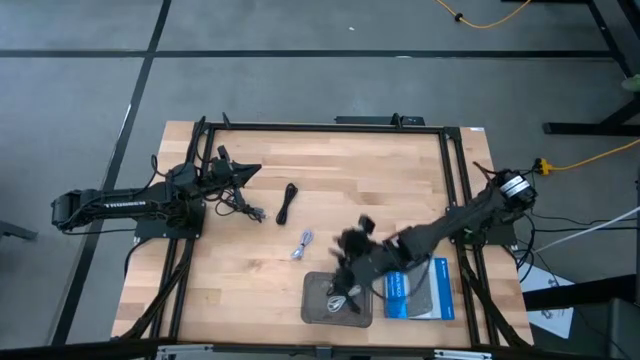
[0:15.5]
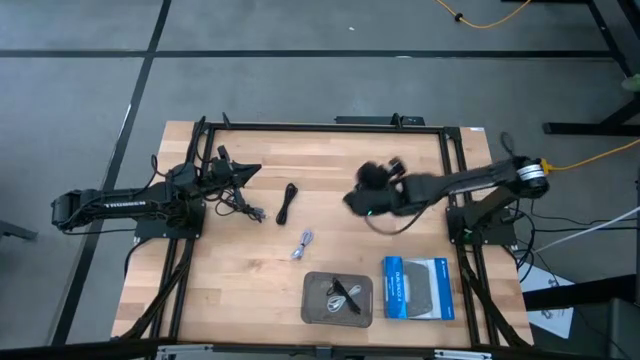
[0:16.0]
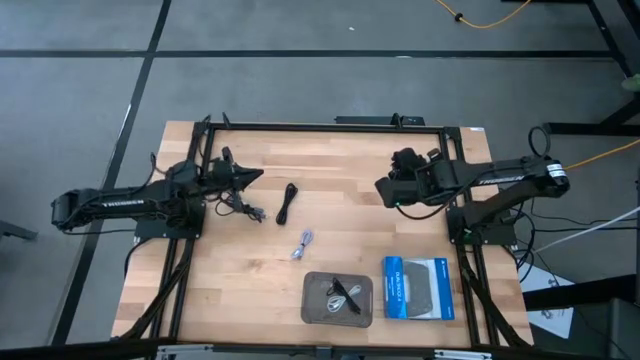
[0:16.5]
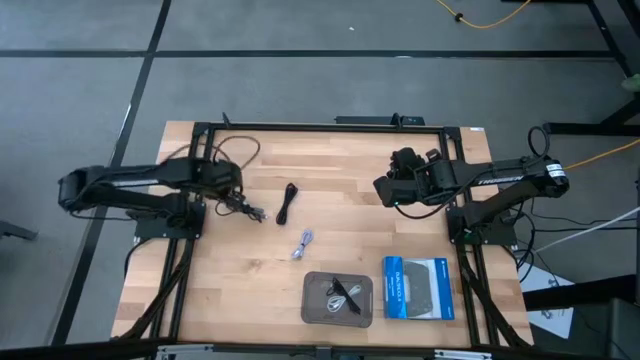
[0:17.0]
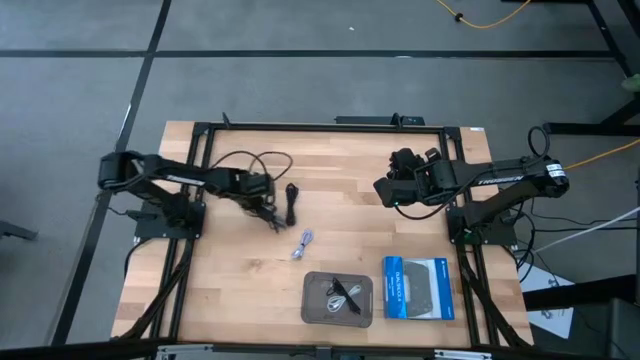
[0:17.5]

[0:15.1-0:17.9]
Task: Pick and place USB-C Cables
Move the left black charger cable to the middle of the table

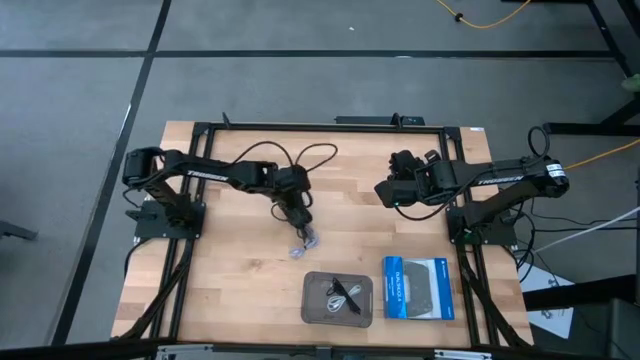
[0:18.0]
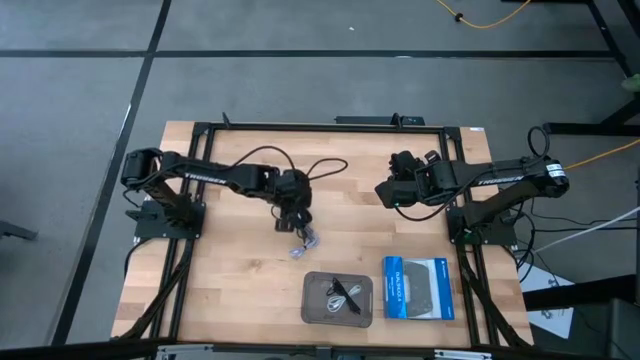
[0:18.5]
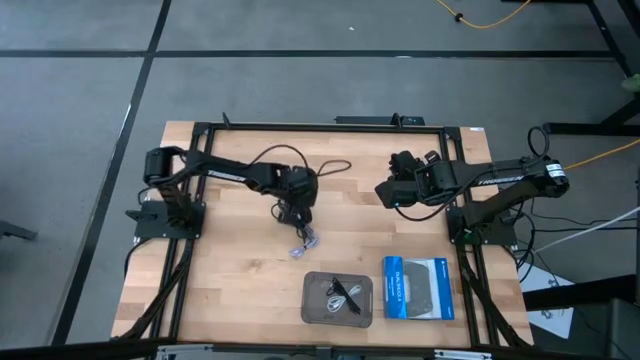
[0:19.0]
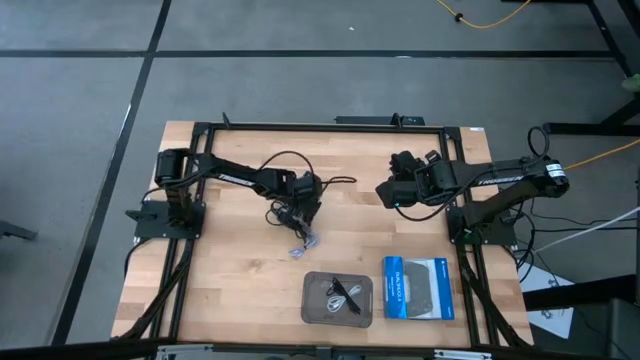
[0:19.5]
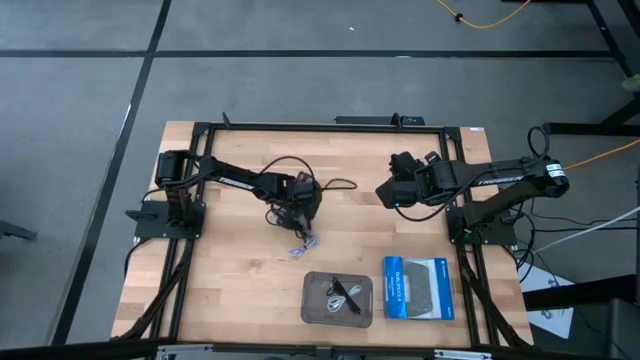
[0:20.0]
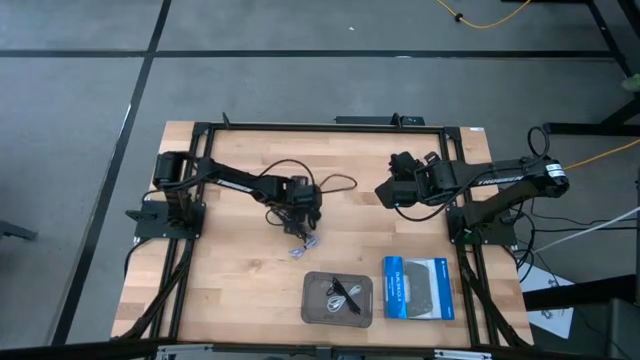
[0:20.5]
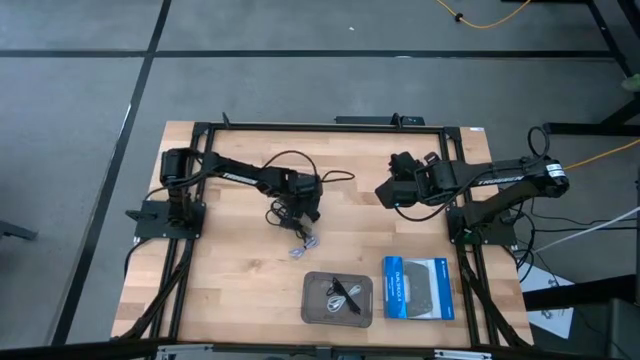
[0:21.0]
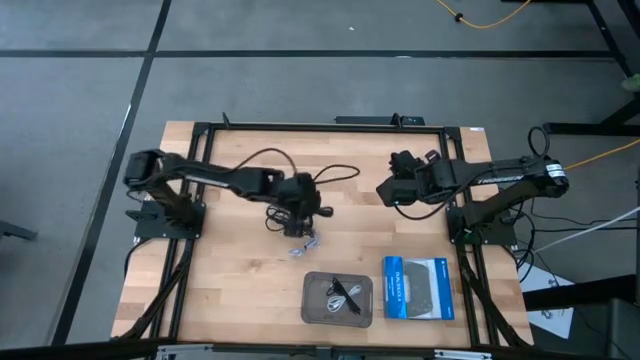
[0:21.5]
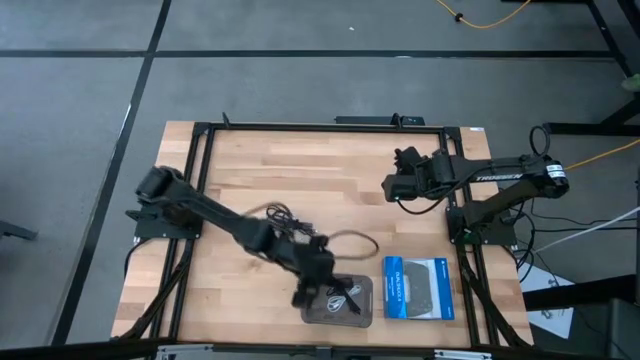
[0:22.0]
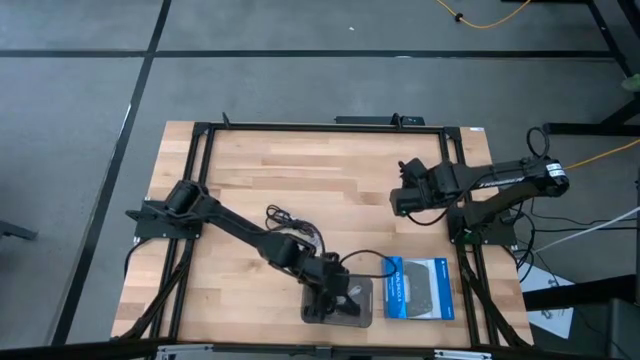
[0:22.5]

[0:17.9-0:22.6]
Put the right black charger cable into the black bin

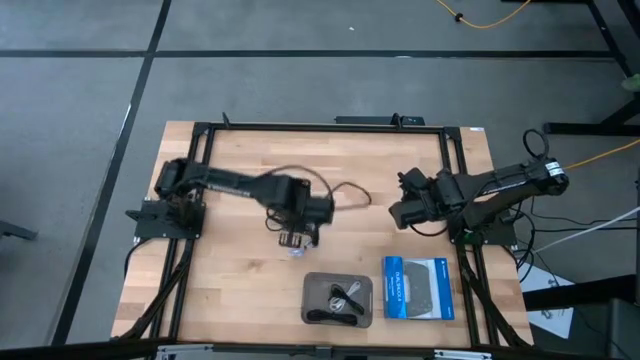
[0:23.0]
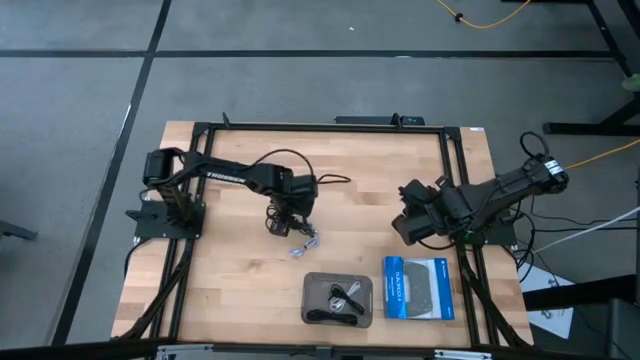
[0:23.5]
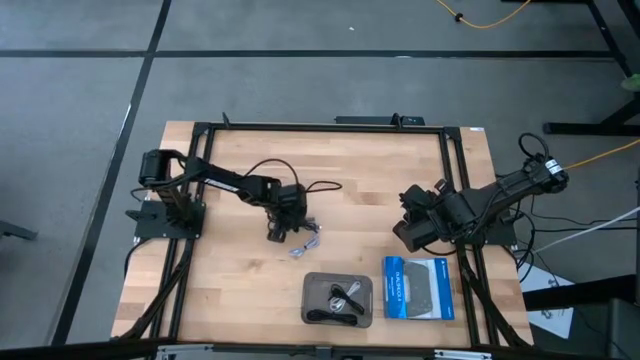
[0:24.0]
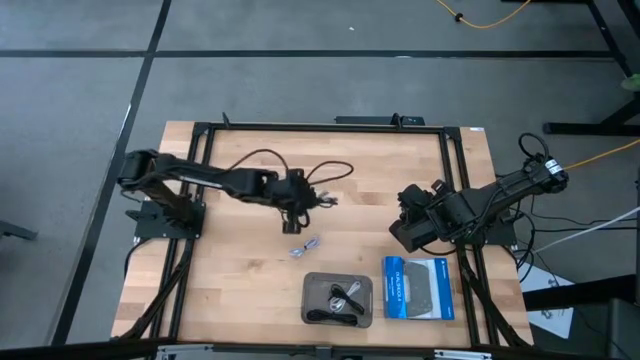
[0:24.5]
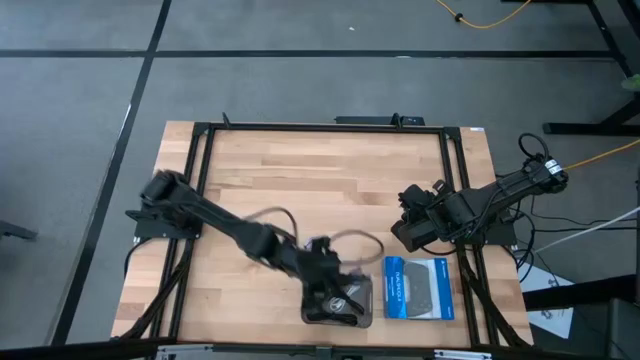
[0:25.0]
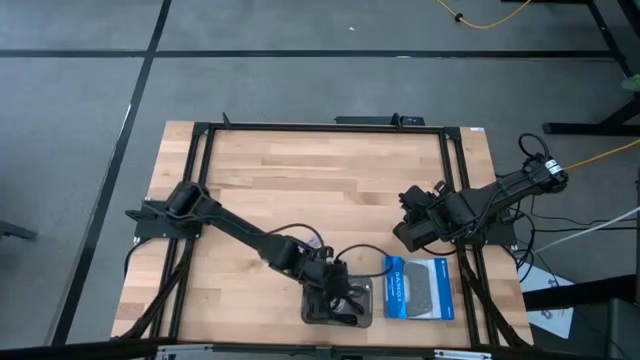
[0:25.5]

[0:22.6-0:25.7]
Put the black charger cable into the black bin

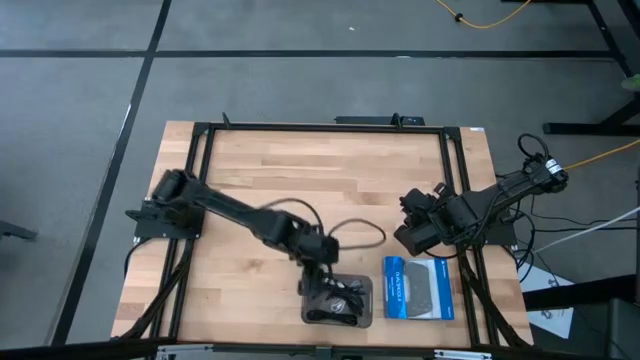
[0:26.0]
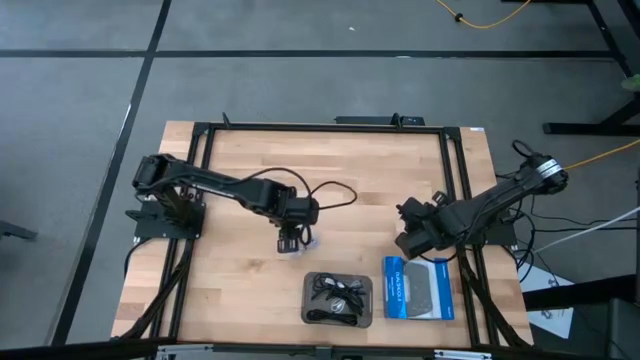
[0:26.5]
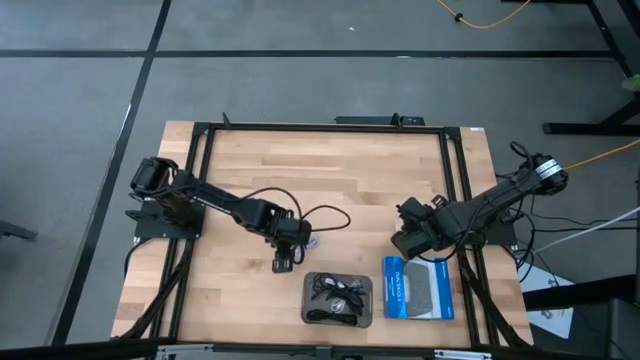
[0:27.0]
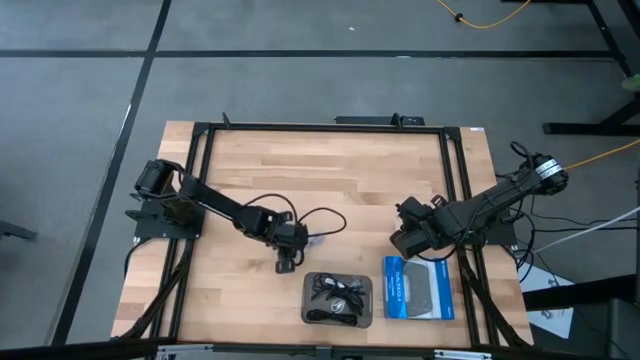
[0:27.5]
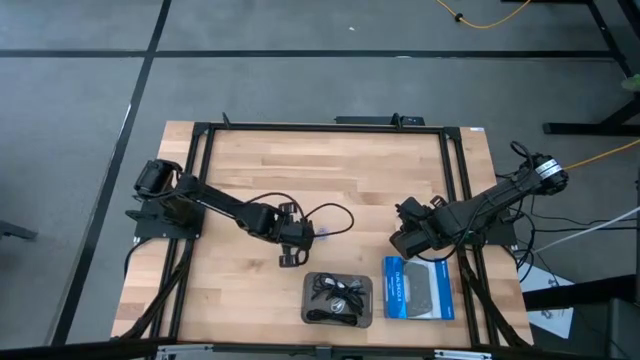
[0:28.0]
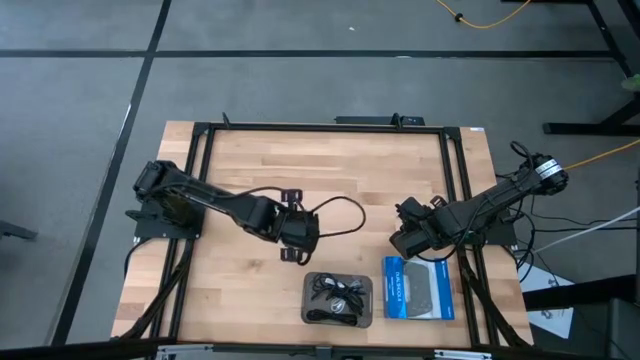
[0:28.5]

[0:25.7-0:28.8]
Put the purple charger cable into the black bin

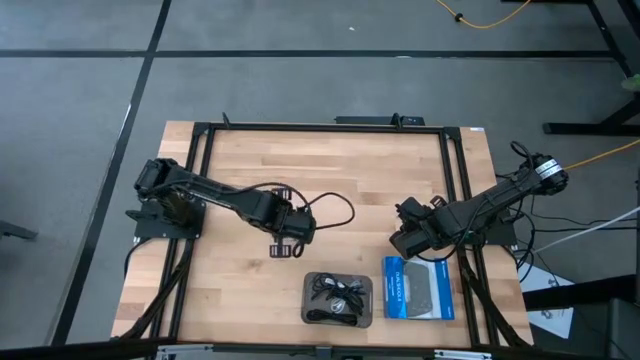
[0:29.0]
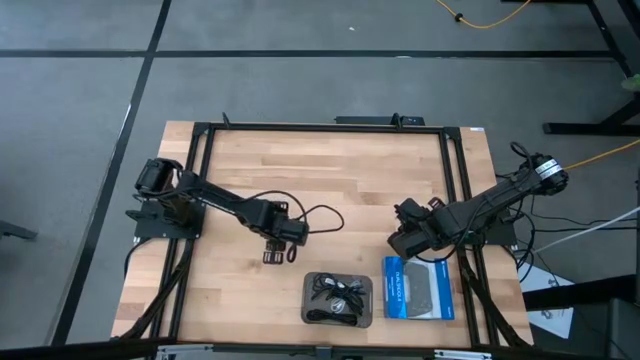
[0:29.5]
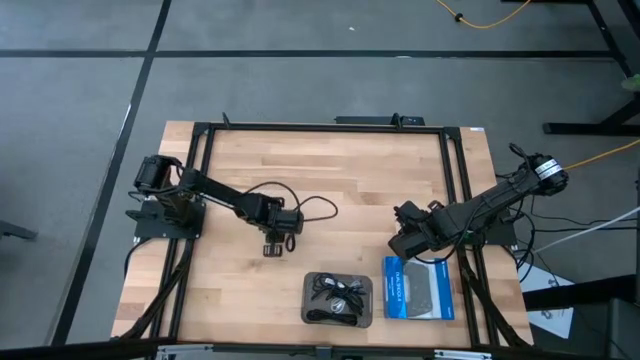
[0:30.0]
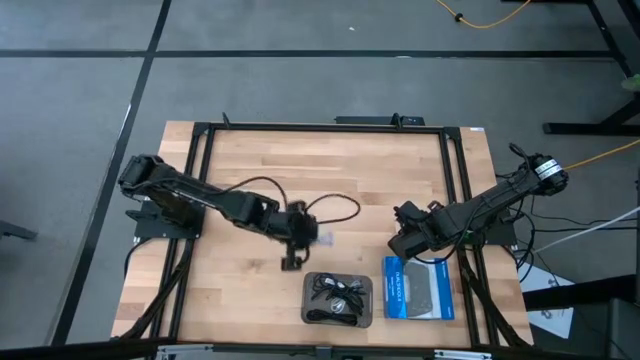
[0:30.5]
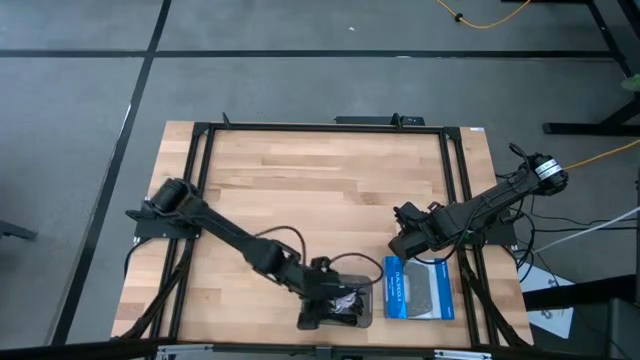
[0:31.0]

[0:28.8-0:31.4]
Put the purple charger cable into the black bin

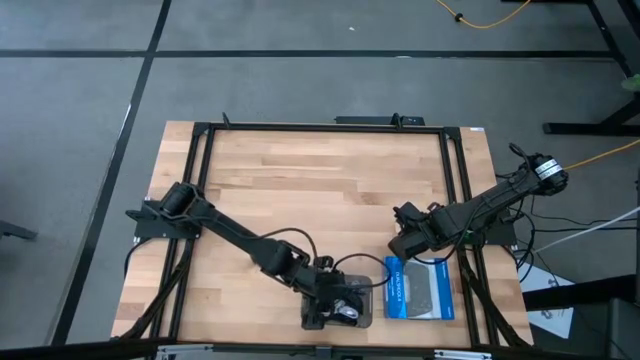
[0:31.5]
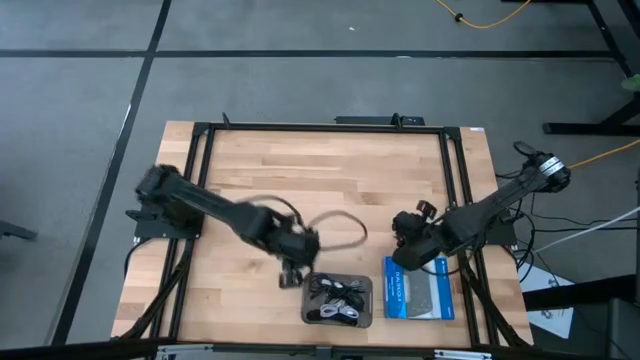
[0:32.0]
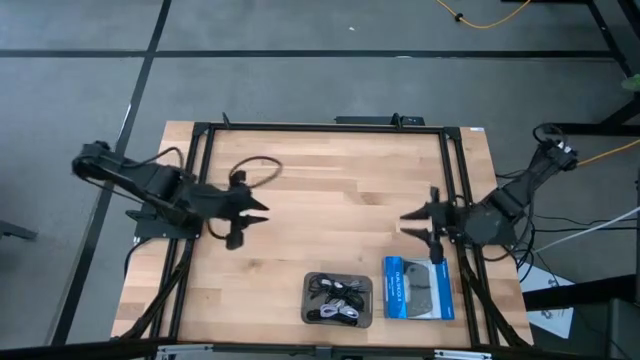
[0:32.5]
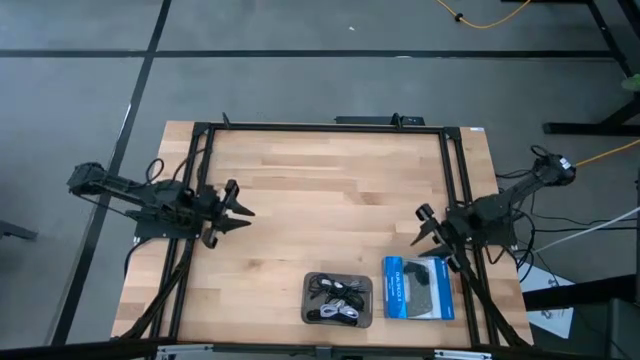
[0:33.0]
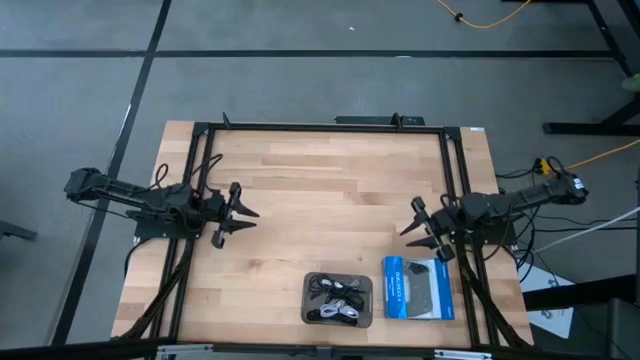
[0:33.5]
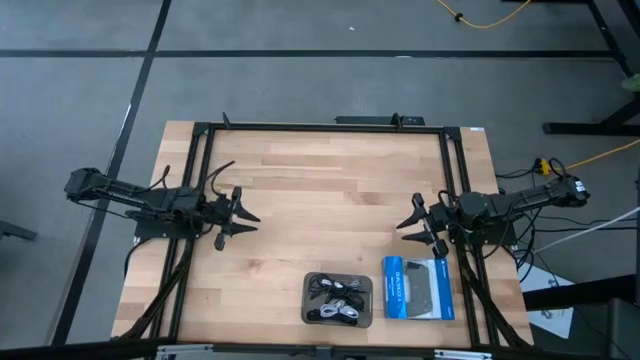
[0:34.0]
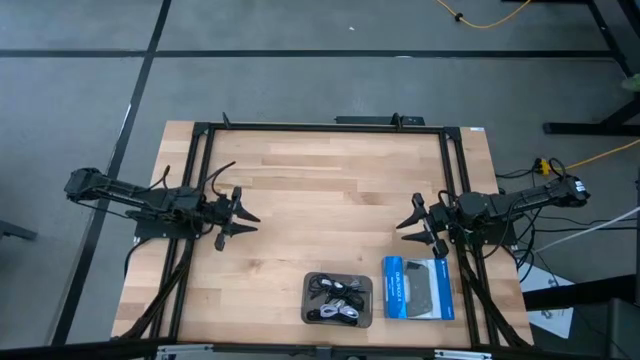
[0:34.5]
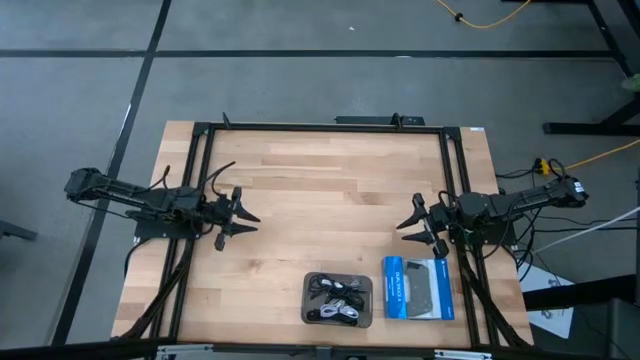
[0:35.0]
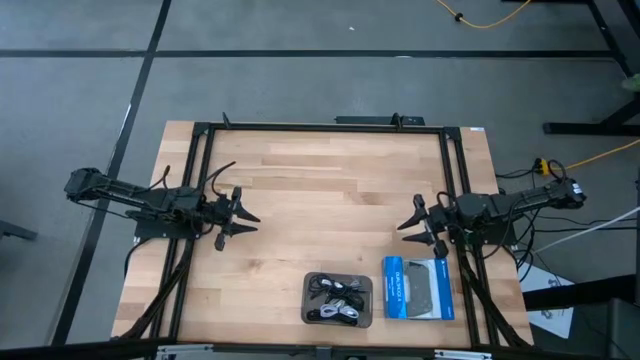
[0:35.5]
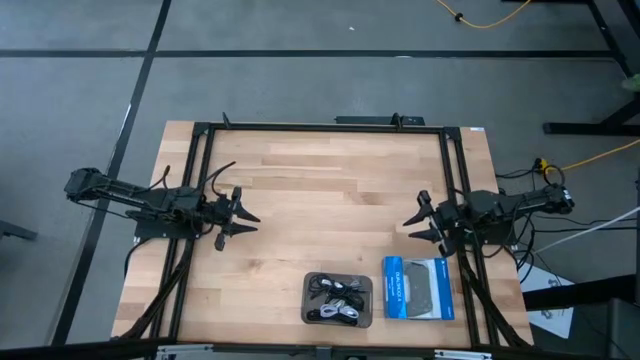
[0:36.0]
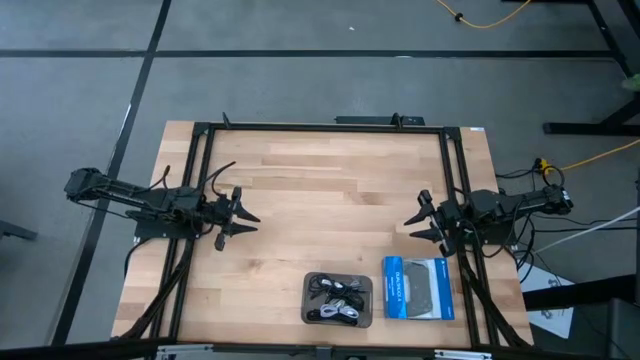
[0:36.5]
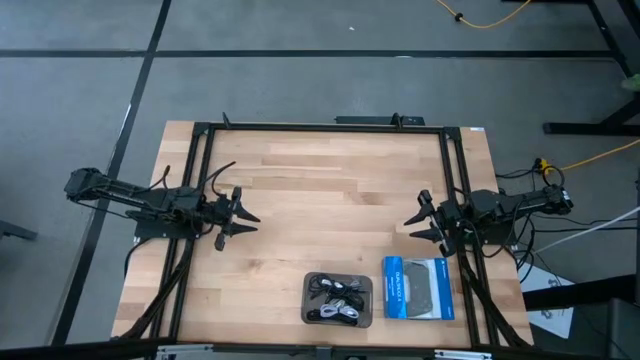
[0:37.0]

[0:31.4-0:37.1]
Return to Home Position
